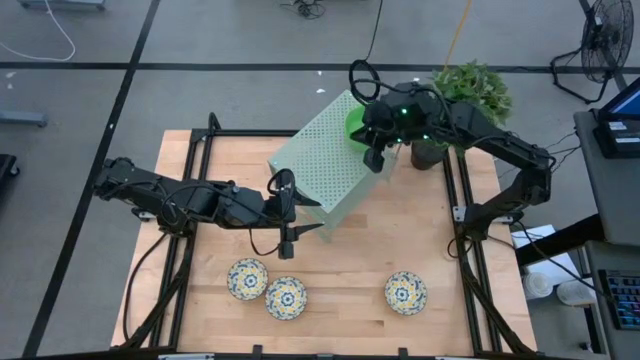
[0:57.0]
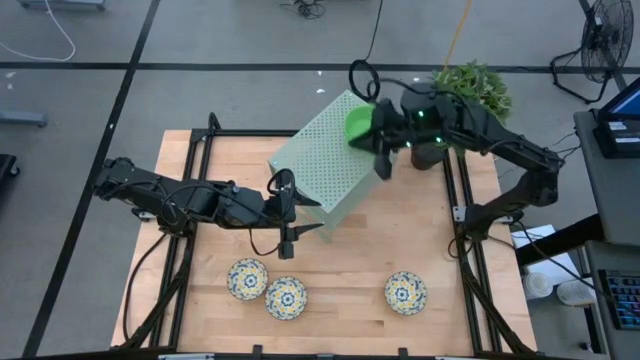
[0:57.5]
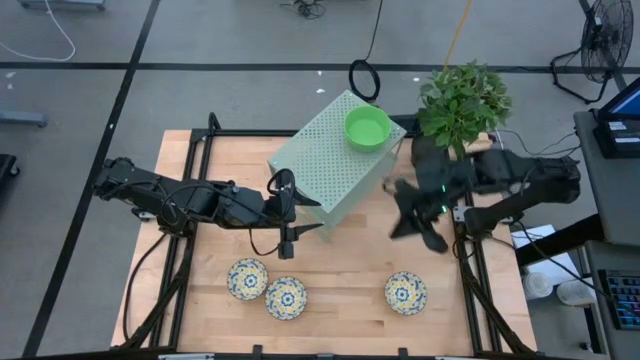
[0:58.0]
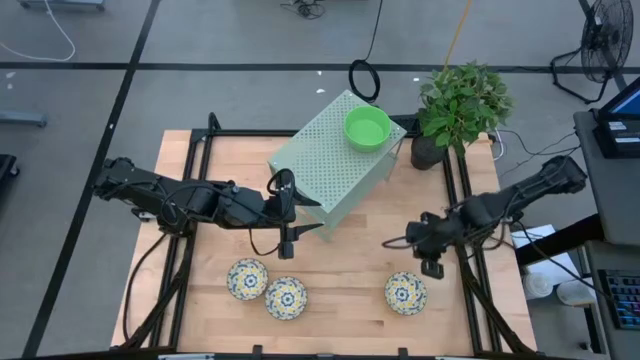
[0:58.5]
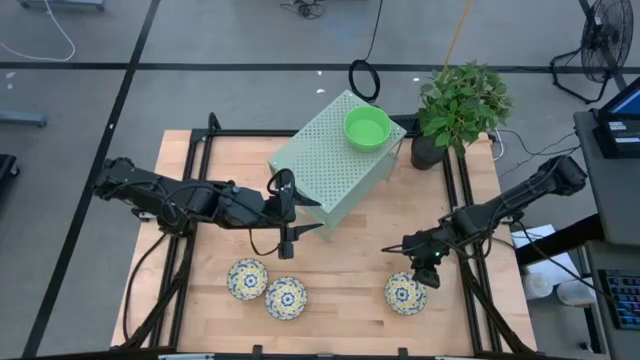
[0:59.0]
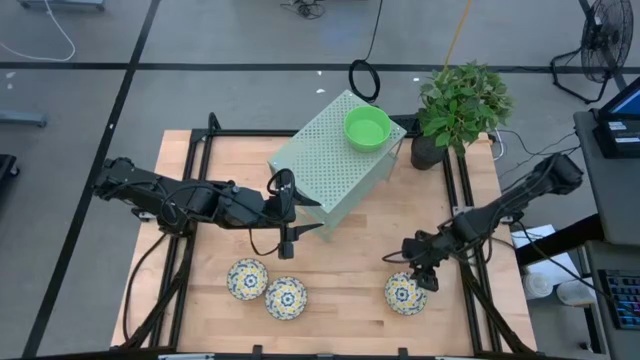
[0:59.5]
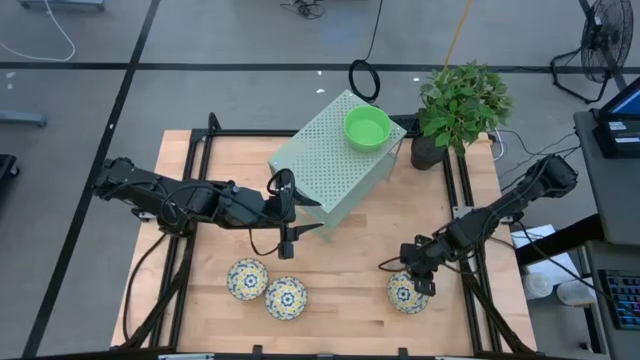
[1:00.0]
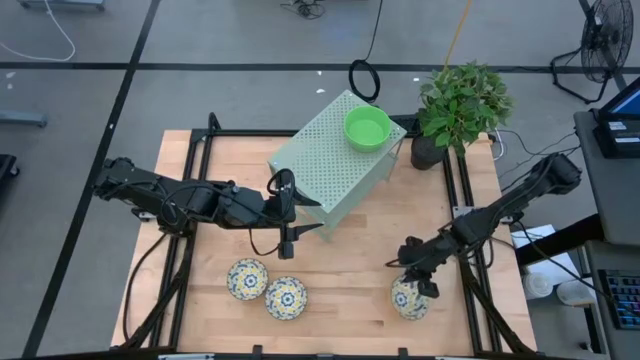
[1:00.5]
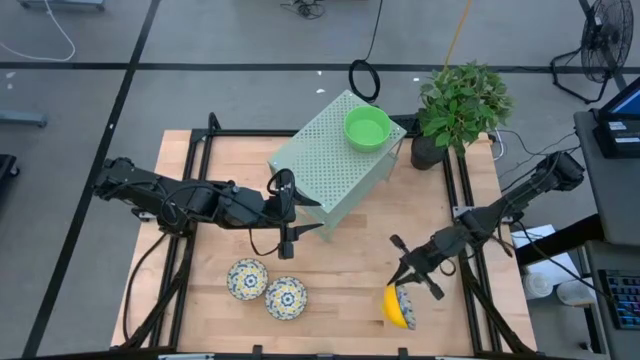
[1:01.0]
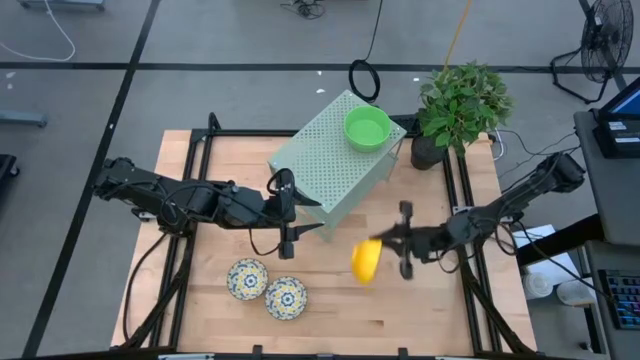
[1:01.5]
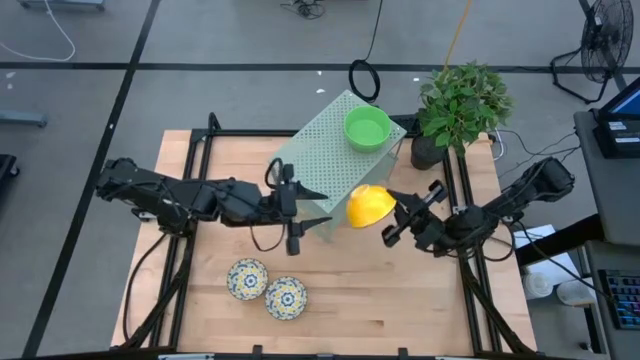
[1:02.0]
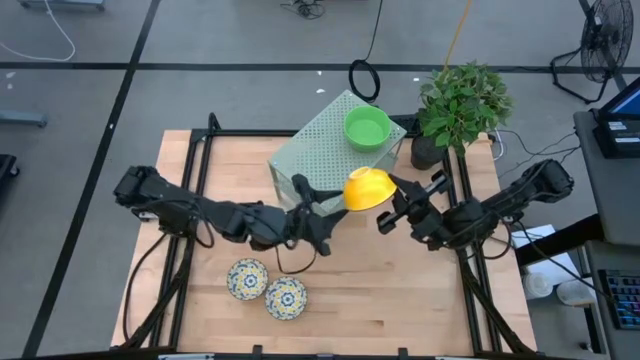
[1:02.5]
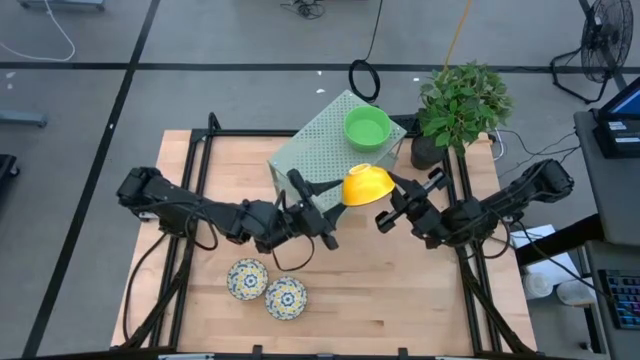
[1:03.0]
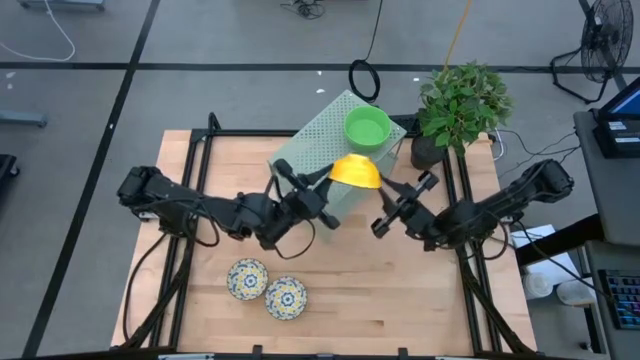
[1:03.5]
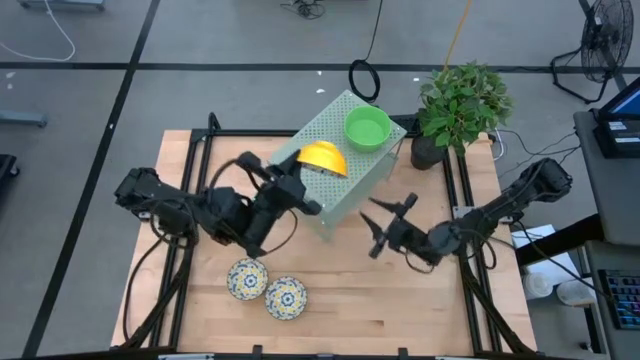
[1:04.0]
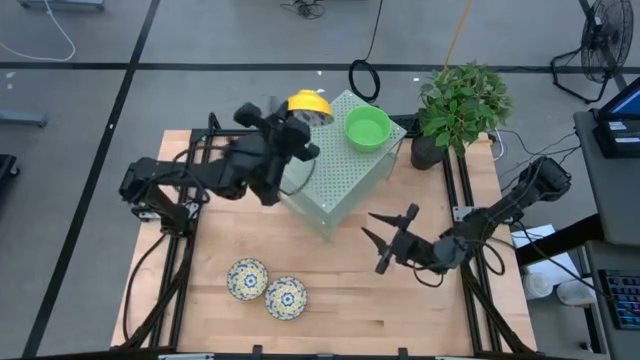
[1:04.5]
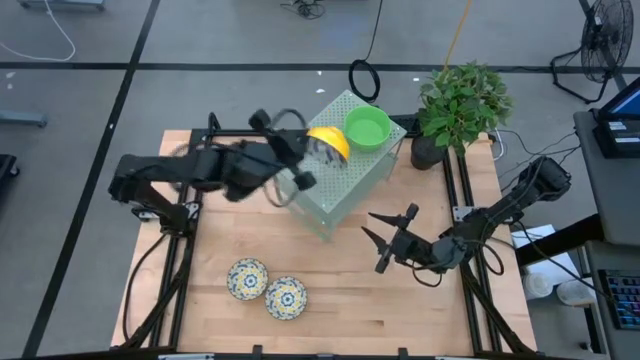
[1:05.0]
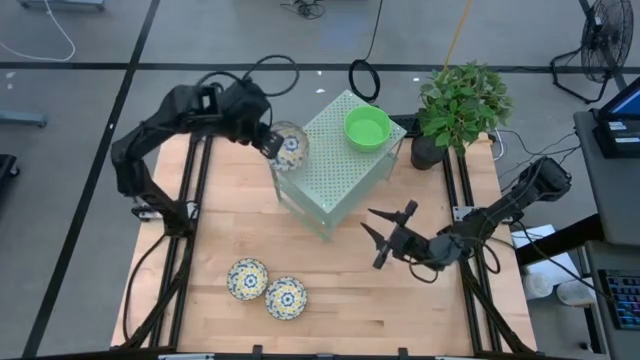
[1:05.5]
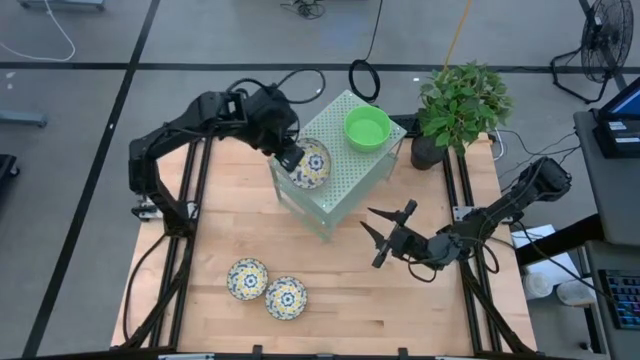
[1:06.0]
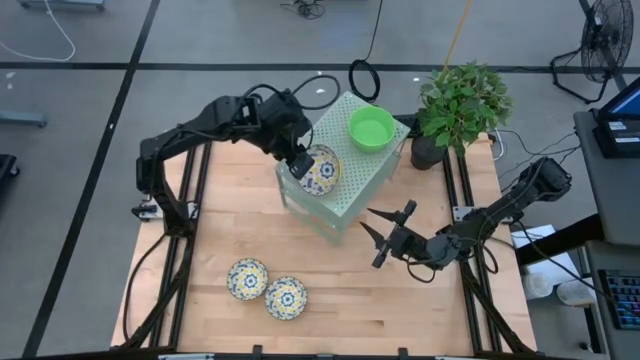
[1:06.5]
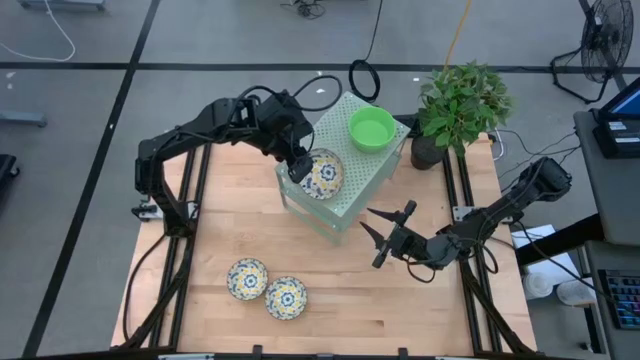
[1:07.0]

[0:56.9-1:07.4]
Task: Pick & Place Mini bowls
Put the right yellow patterned bowl on the shelf

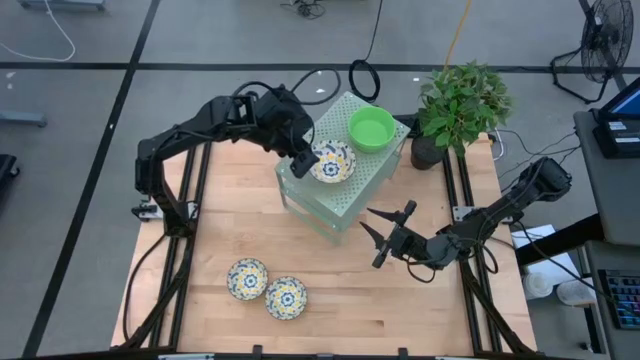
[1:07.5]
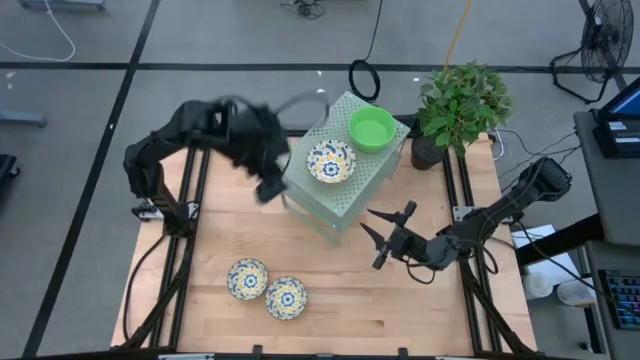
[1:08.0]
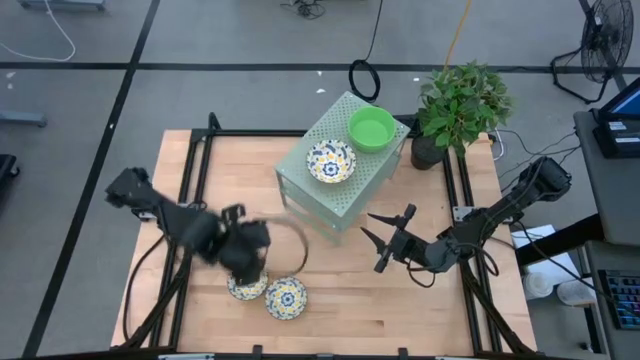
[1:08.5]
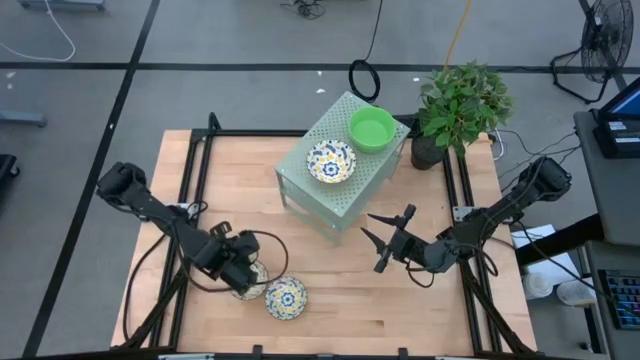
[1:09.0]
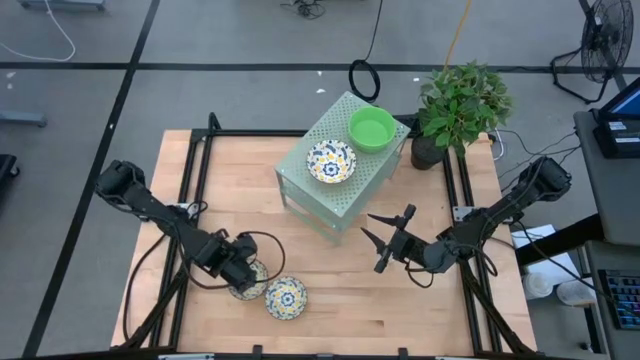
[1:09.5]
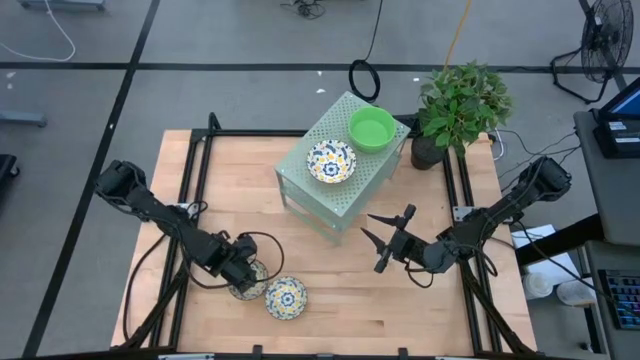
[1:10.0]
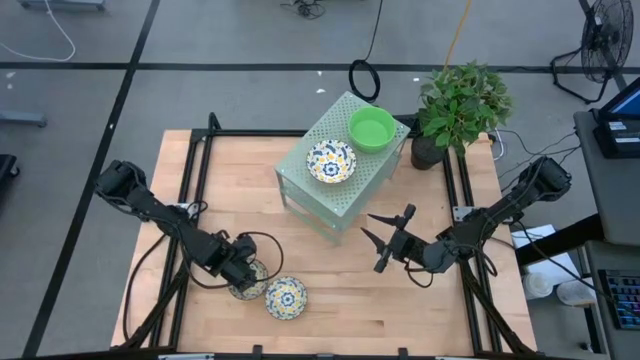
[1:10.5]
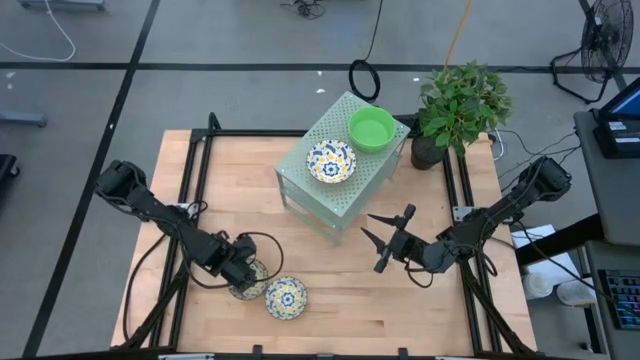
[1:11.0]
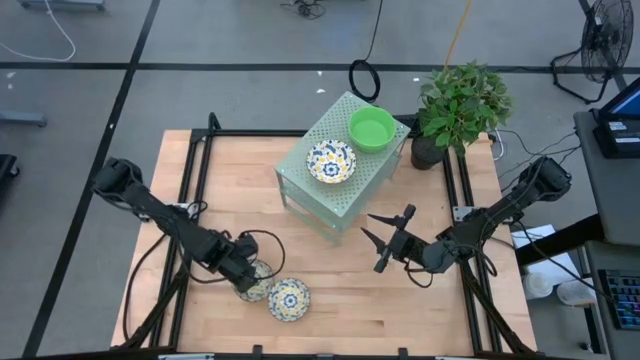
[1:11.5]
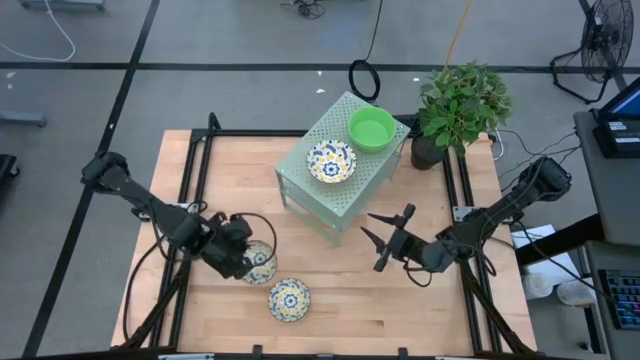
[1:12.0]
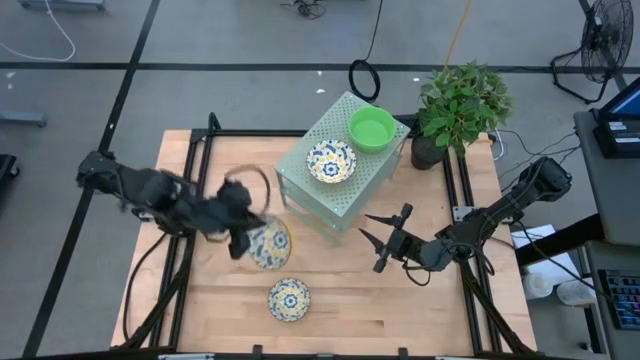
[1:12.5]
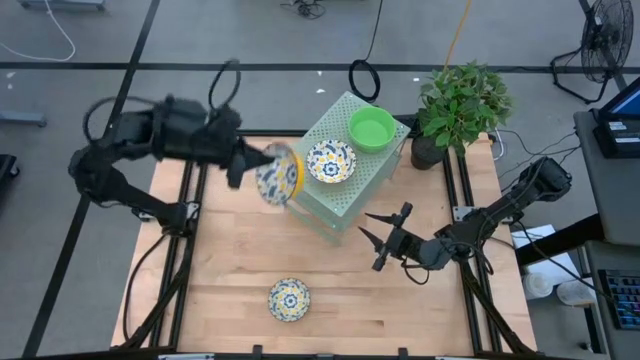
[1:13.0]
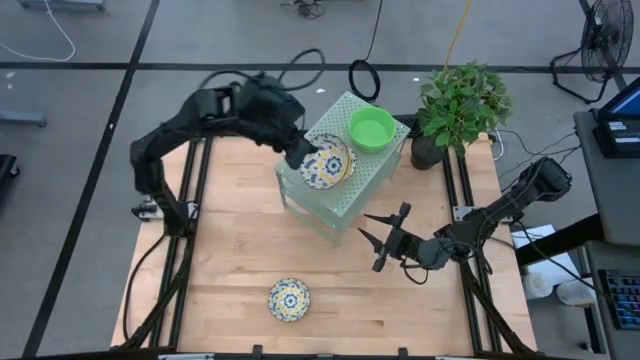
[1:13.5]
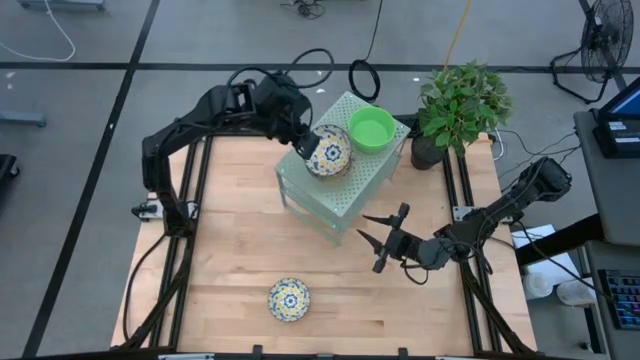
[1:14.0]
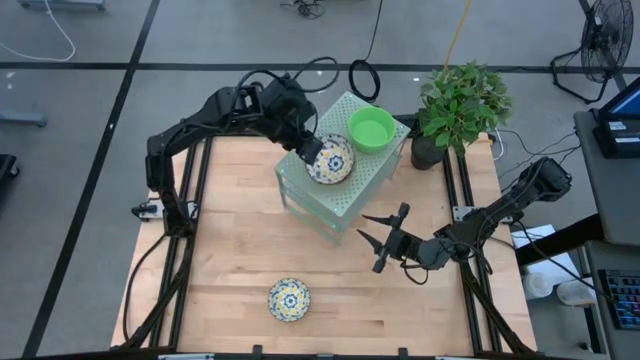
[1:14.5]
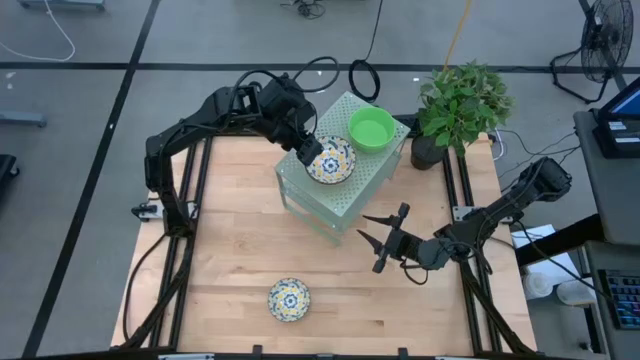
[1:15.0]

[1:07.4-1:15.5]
Stack the left yellow patterned bowl on the yellow patterned bowl on the shelf
